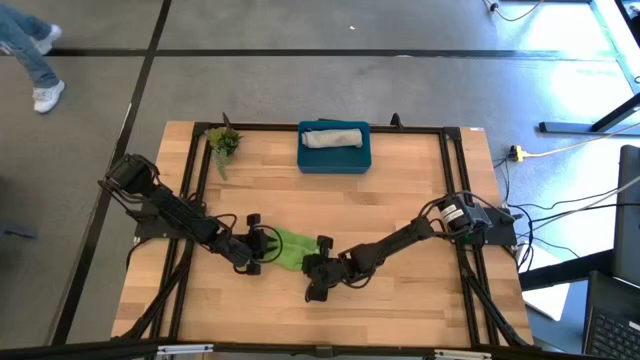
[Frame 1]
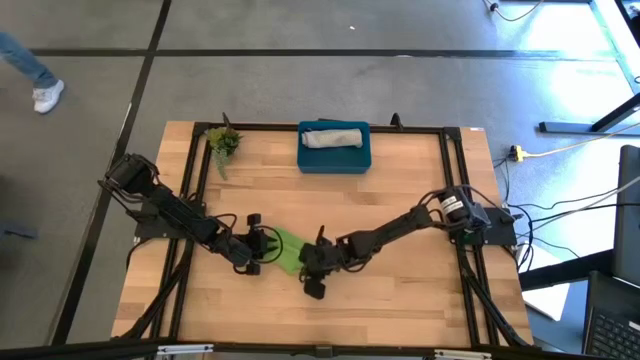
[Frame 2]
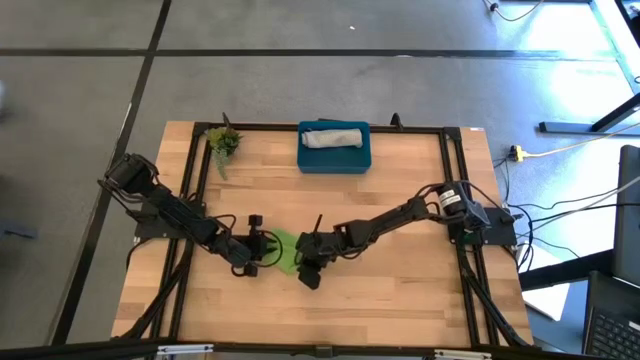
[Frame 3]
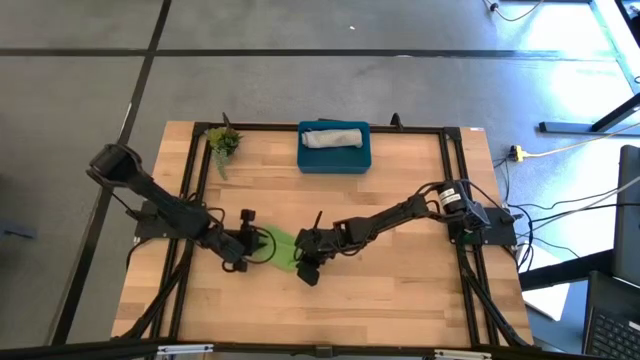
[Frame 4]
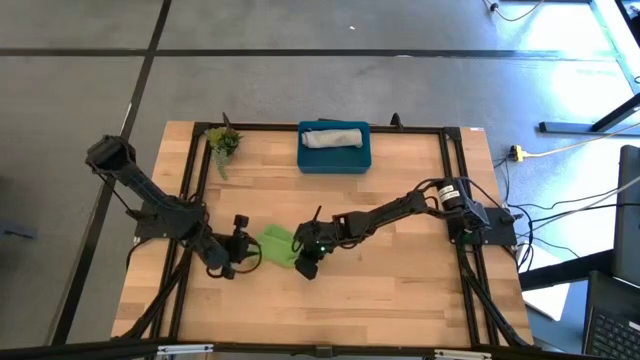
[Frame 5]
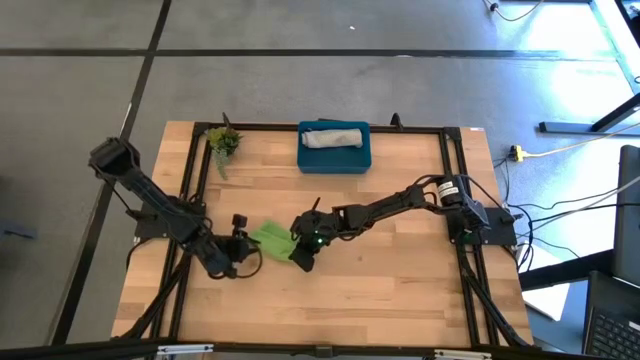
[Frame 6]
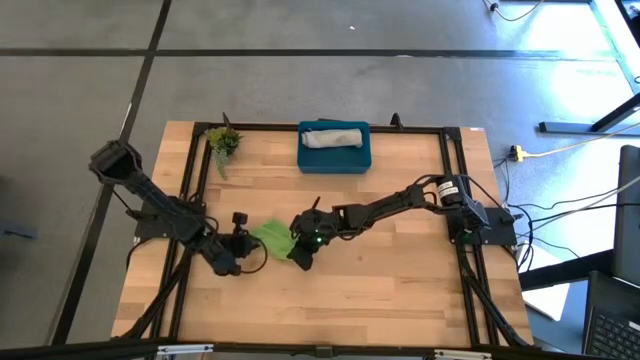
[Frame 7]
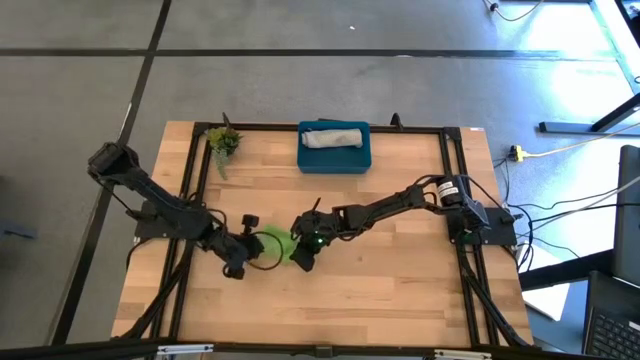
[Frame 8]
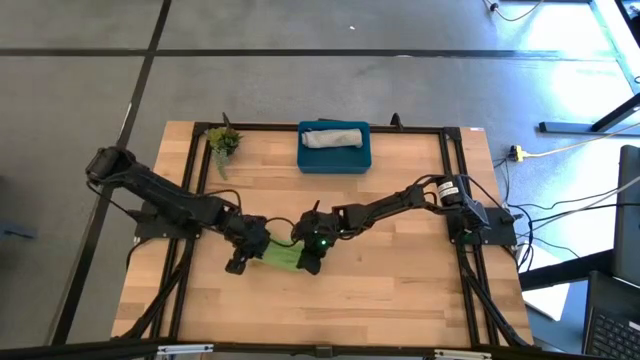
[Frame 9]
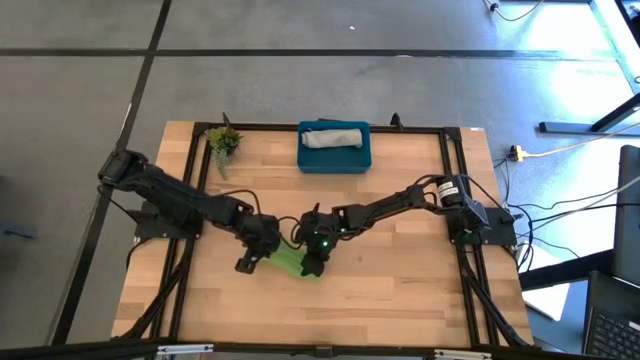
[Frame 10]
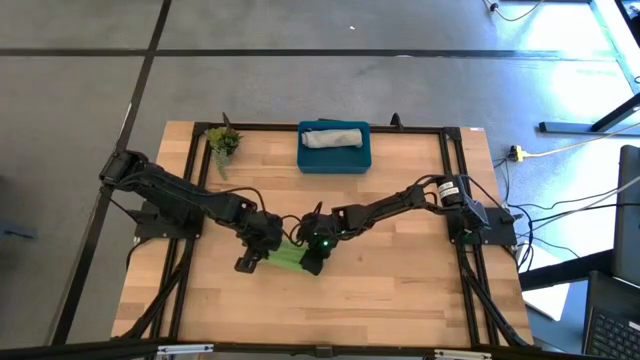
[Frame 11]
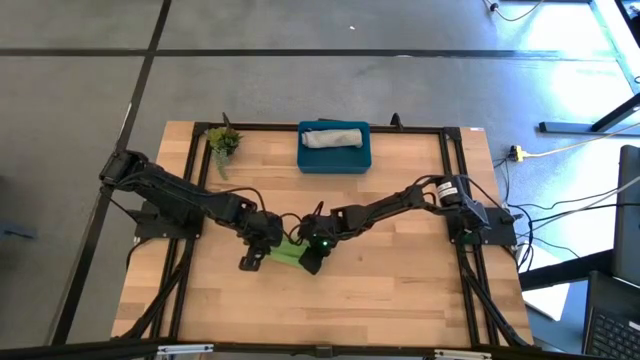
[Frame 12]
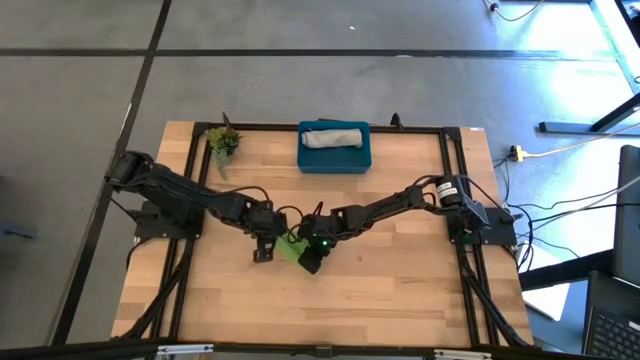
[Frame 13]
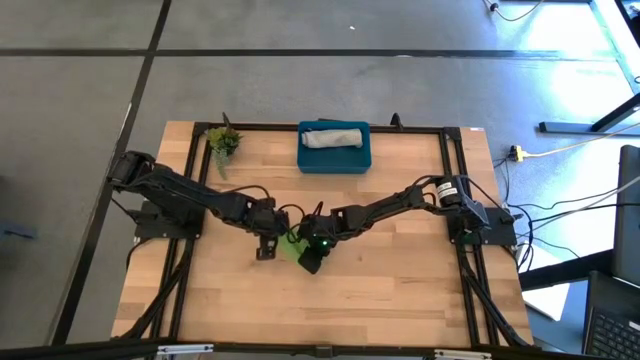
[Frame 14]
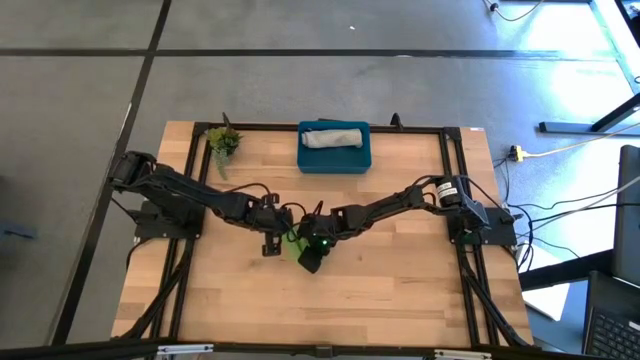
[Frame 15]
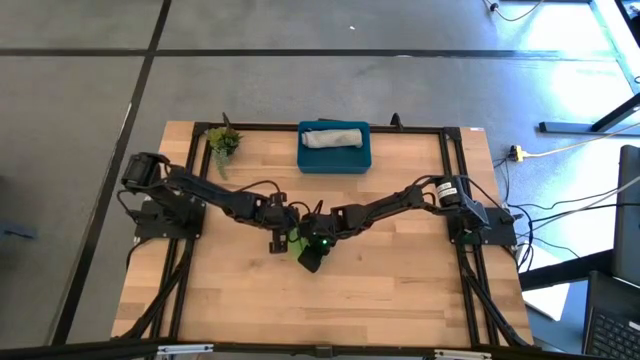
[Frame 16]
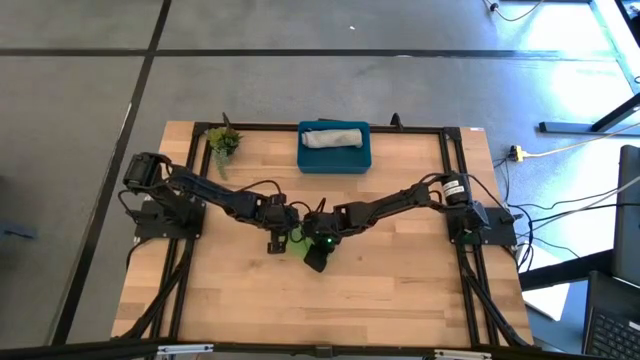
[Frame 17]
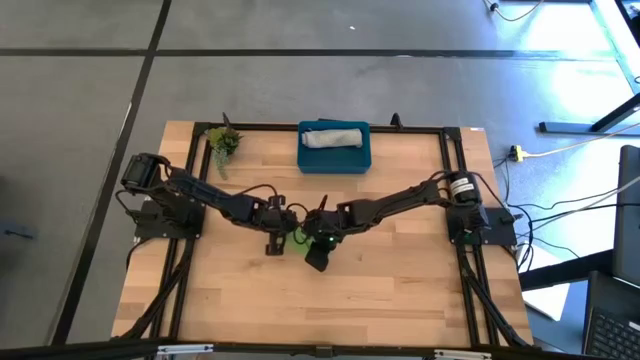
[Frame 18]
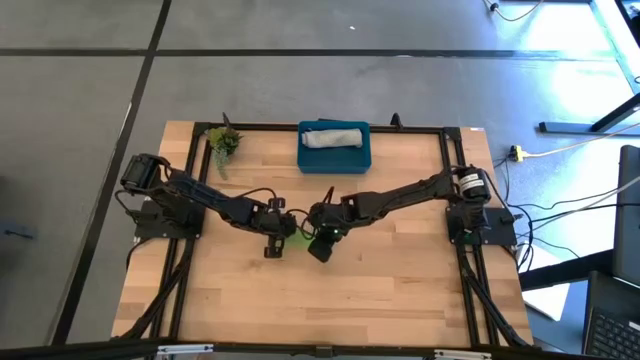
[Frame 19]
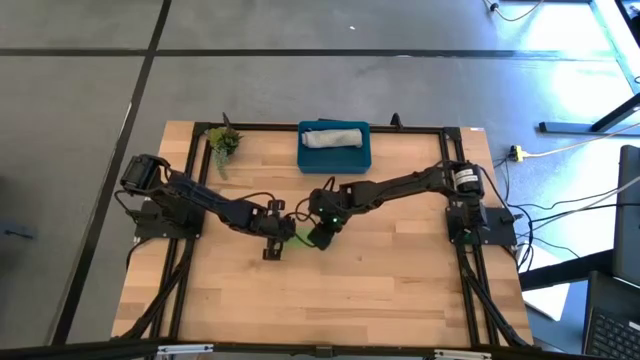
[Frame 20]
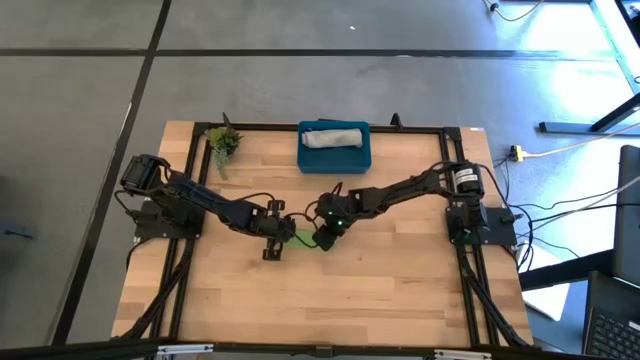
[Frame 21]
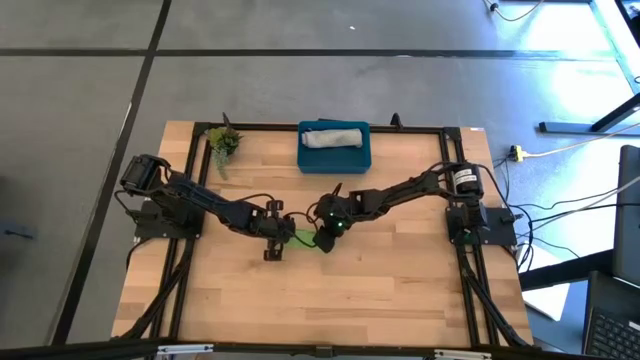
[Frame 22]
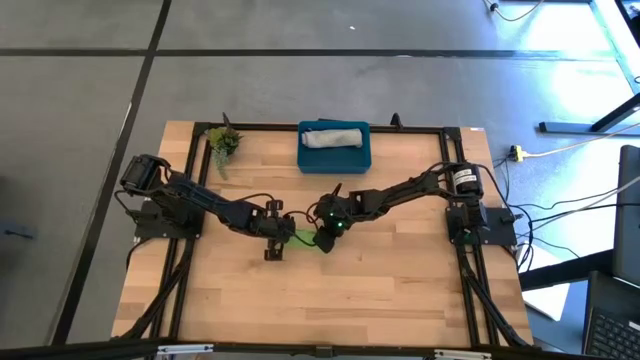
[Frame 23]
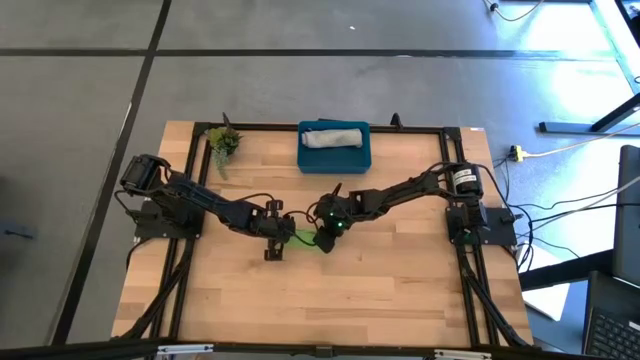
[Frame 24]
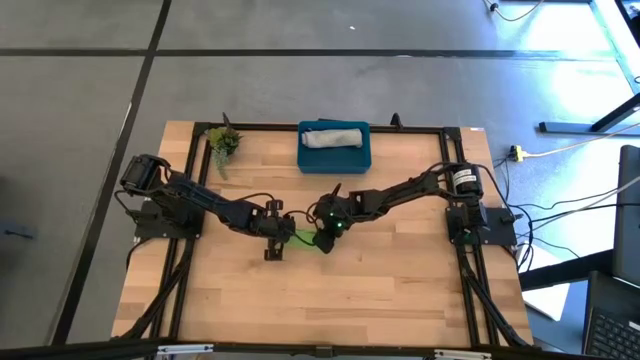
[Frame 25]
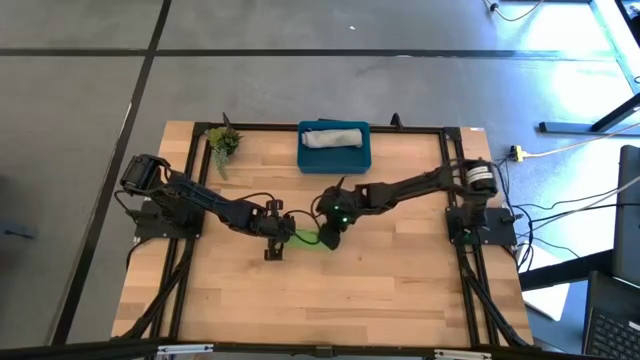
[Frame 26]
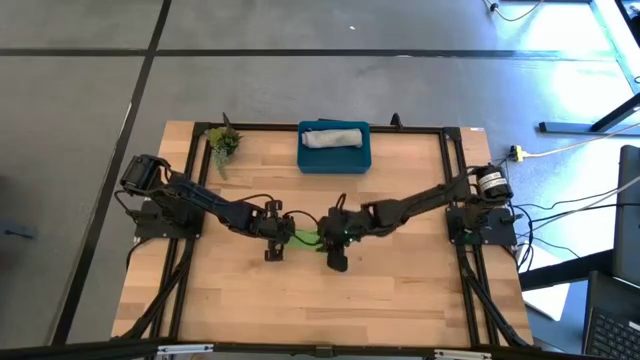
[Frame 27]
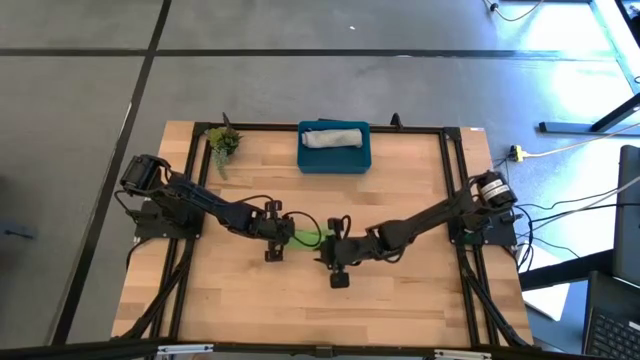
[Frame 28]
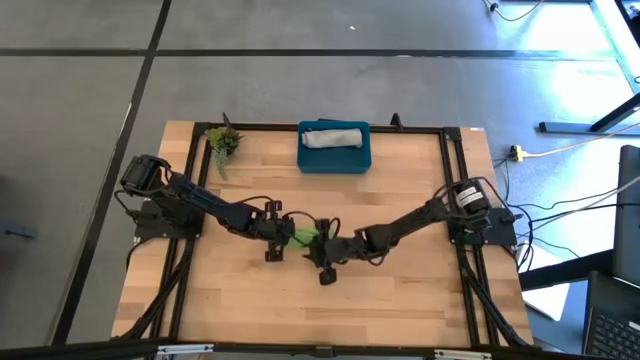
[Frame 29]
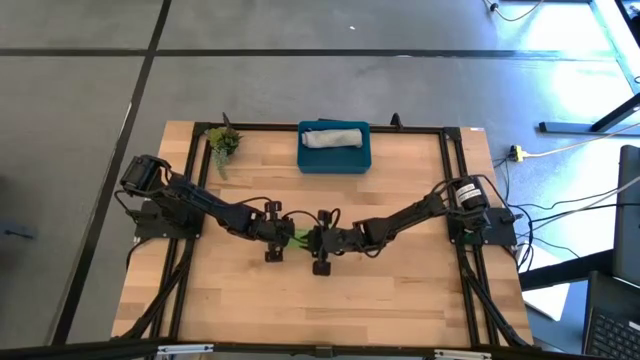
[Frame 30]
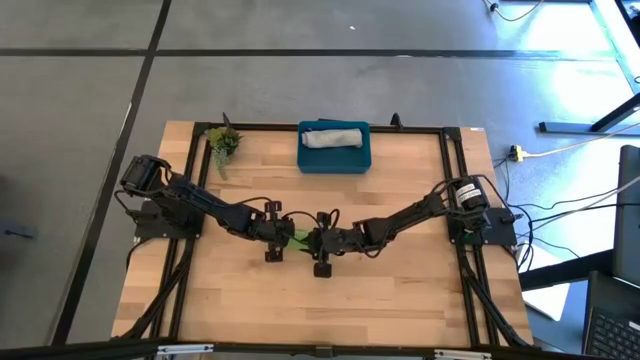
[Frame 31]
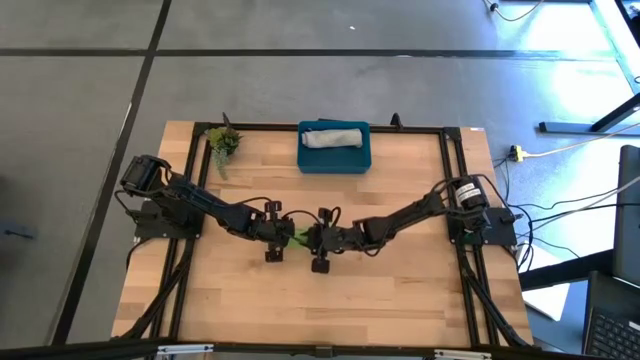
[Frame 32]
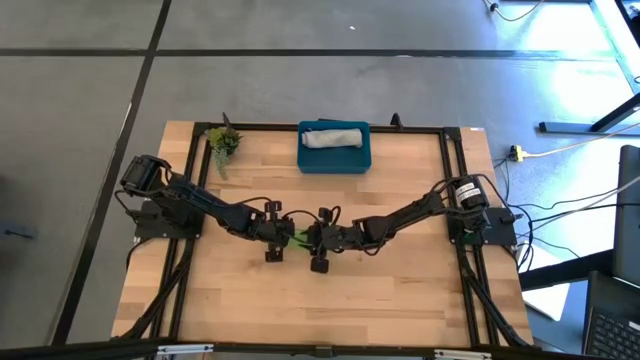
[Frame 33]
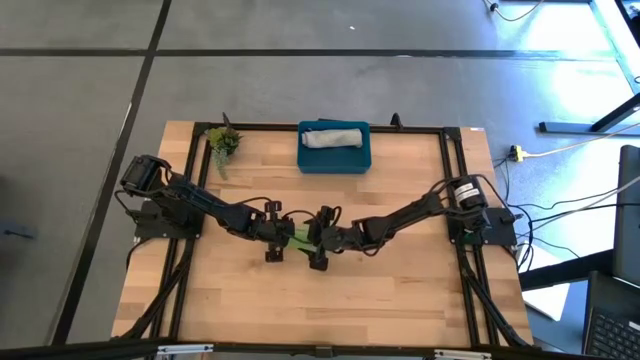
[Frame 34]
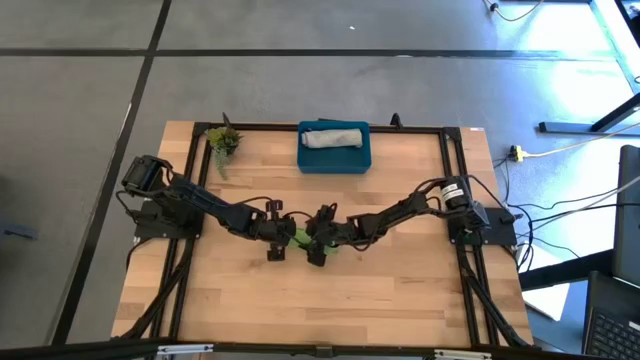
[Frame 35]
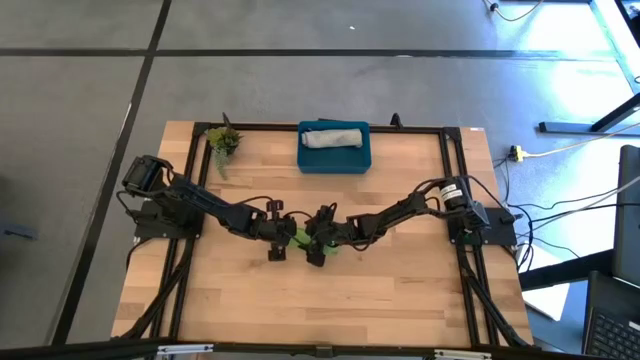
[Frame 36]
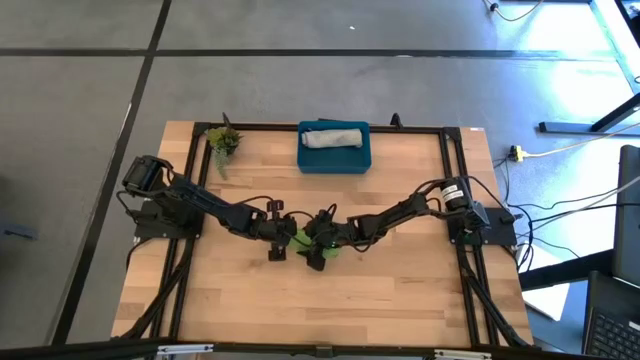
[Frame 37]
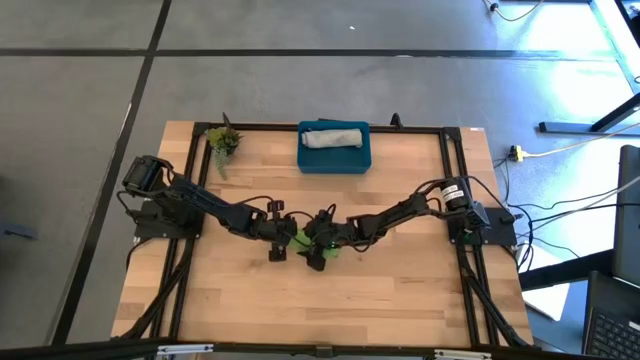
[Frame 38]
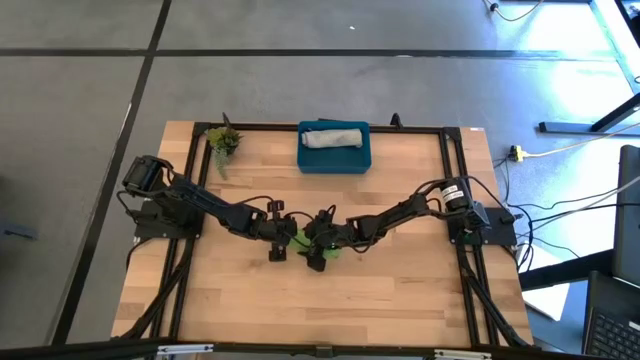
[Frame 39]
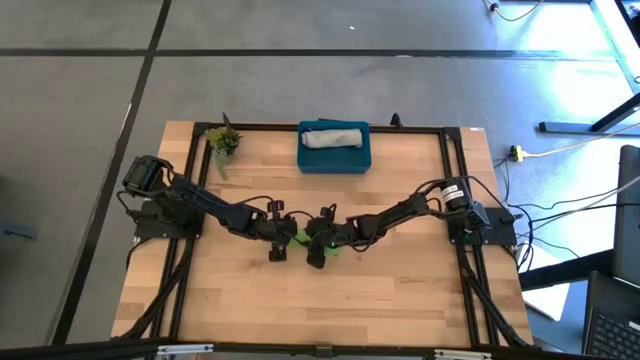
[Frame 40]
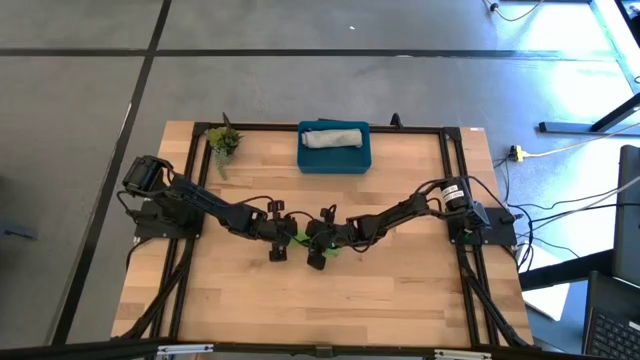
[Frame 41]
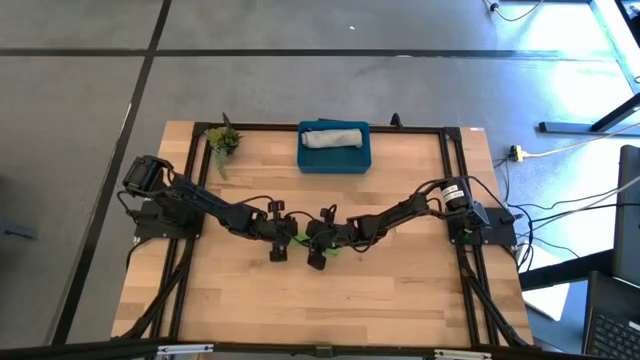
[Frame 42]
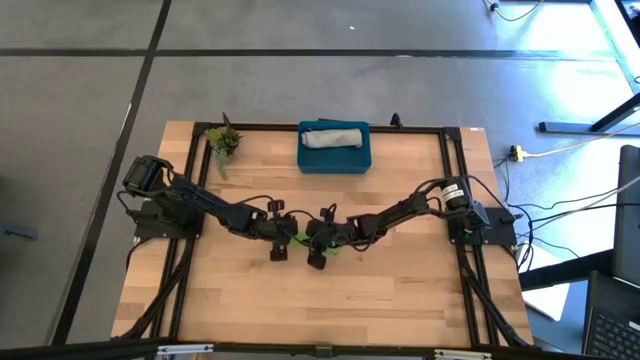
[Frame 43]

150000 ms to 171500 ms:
Task: Roll microfiber towels into tight, uniform cylinder then place into a basket
Roll the green microfiber cloth

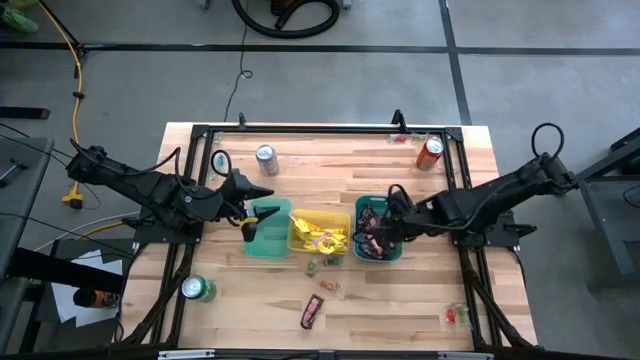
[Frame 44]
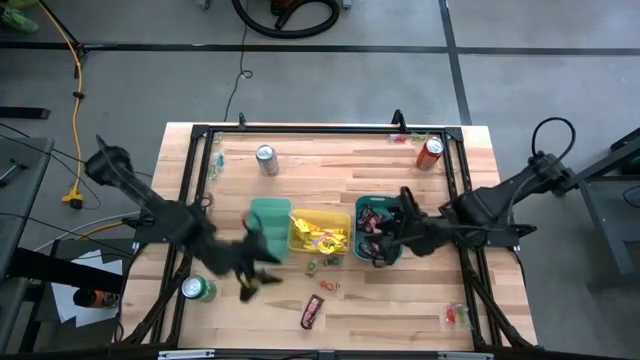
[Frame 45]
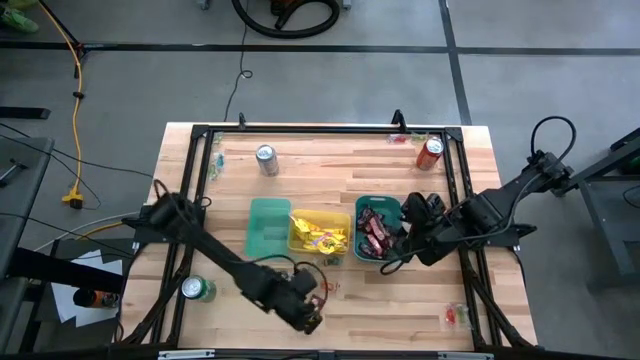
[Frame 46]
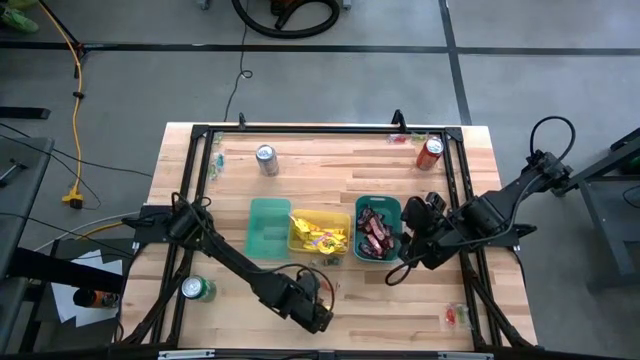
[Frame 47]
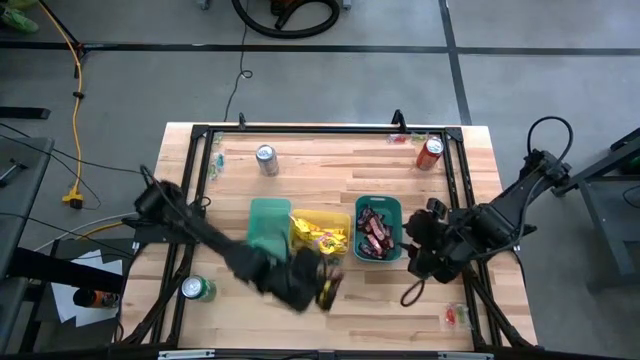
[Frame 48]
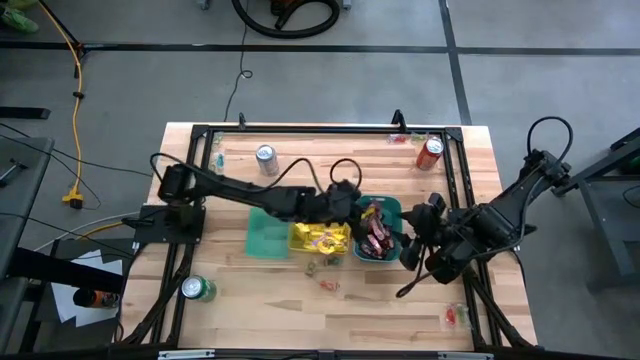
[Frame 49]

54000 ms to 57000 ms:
Task: Sort candy
Put the brown chocolate bar into the blue bin
